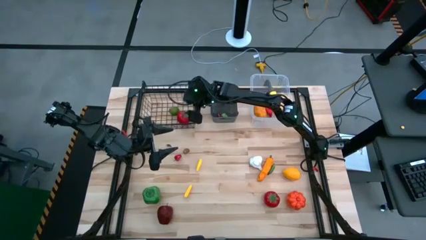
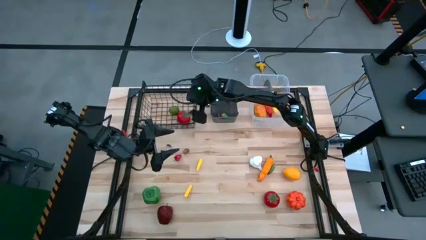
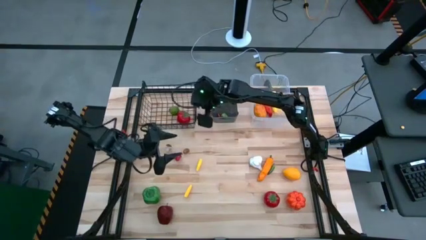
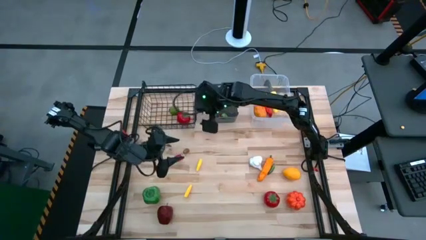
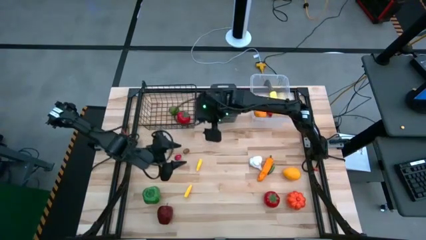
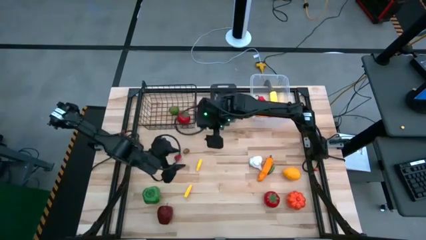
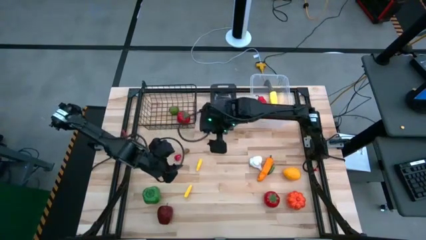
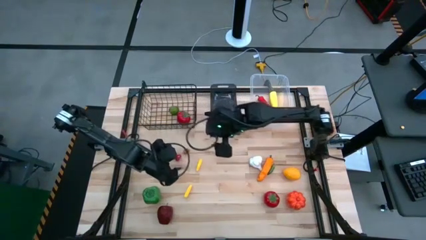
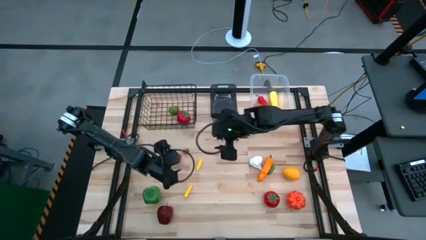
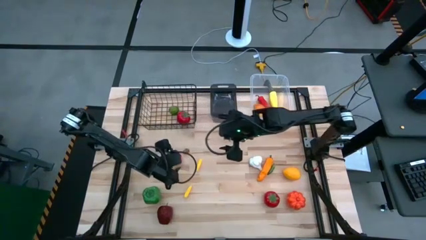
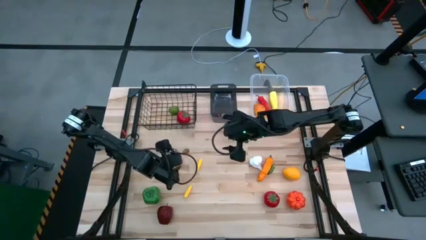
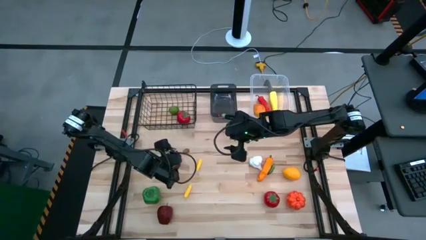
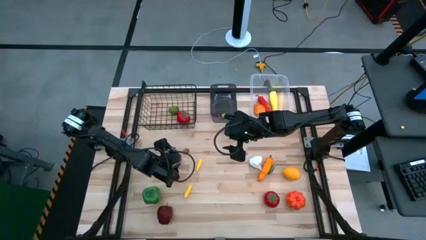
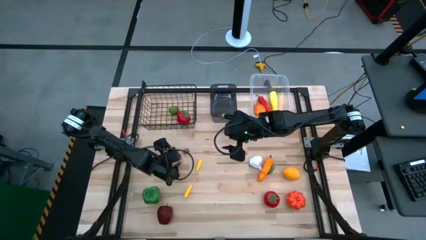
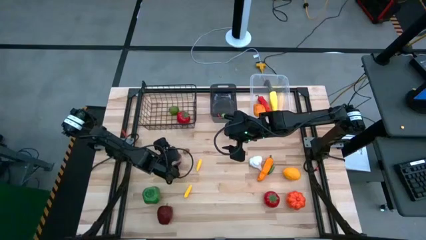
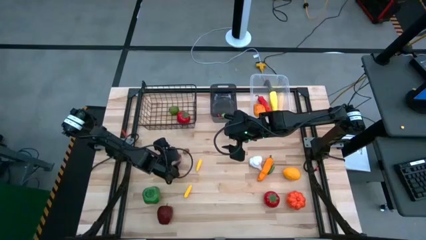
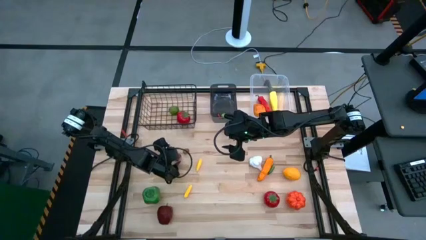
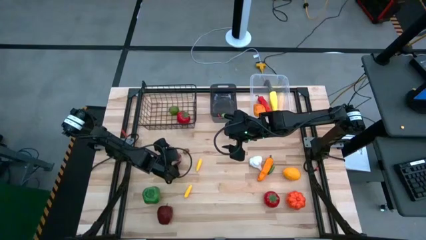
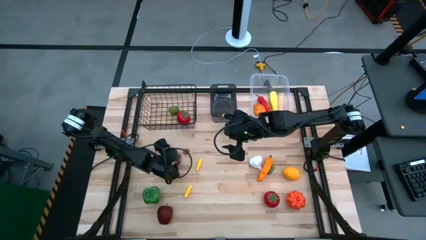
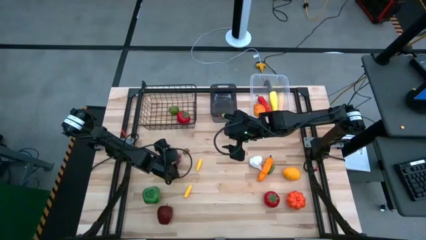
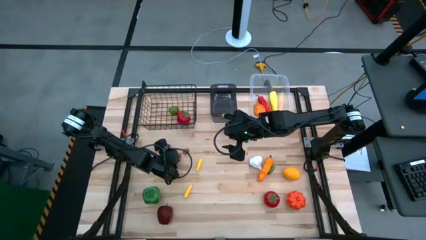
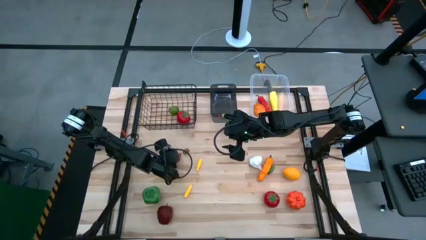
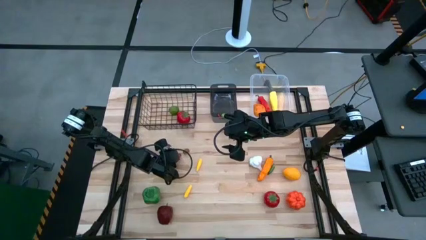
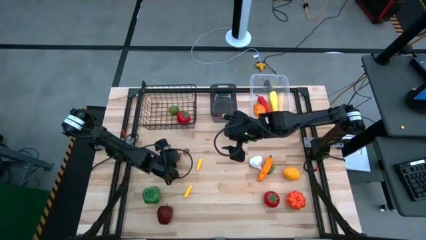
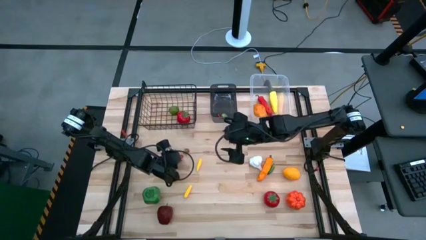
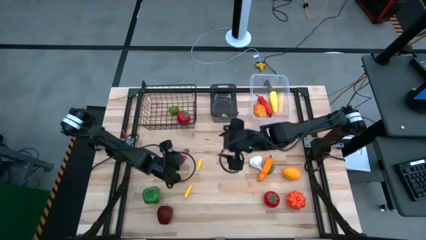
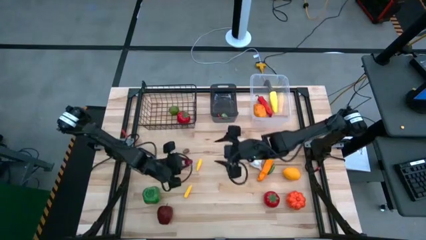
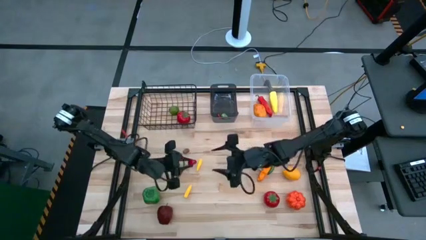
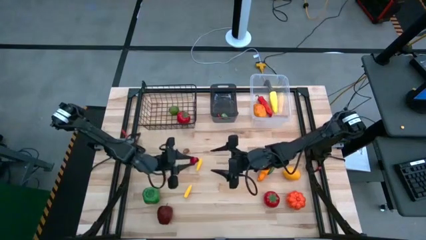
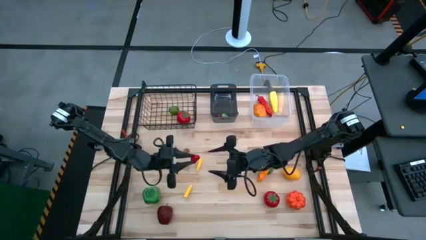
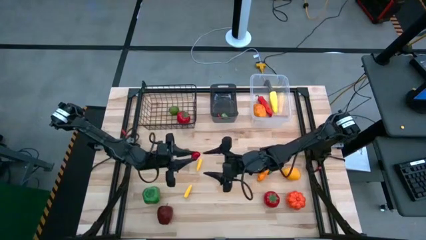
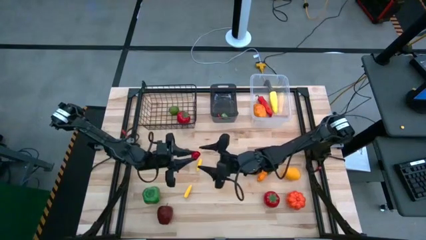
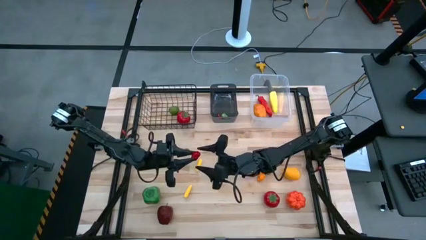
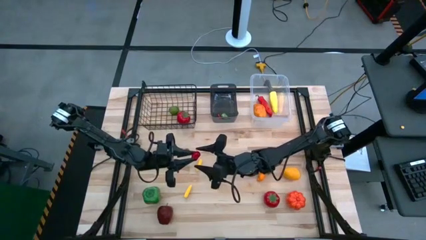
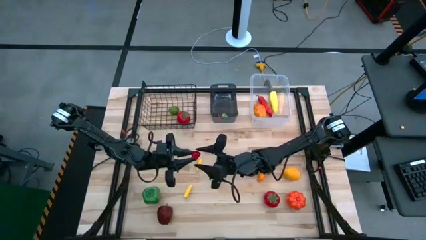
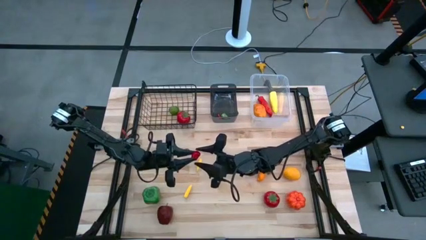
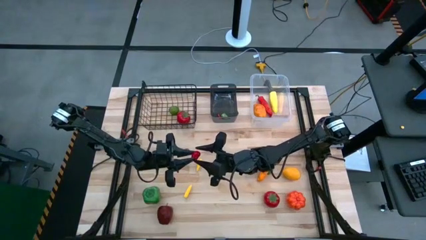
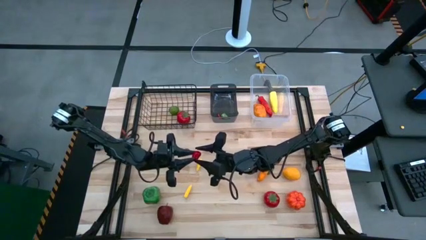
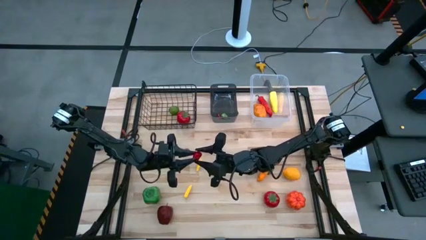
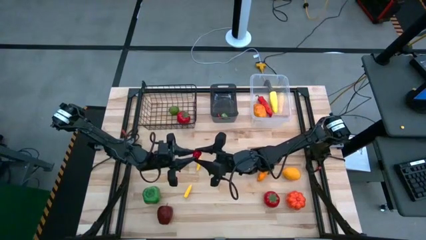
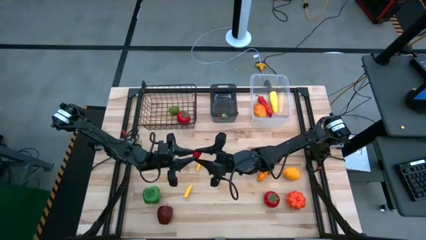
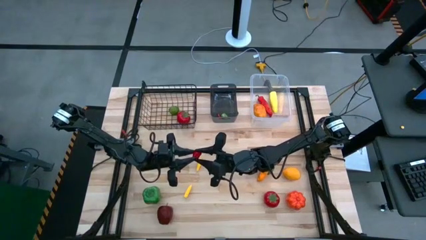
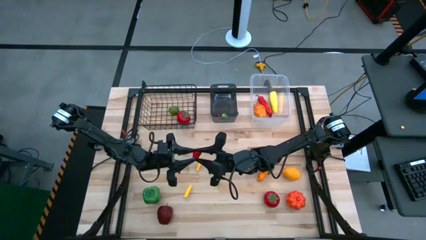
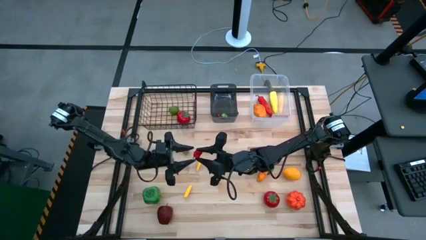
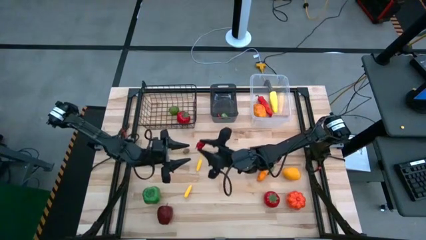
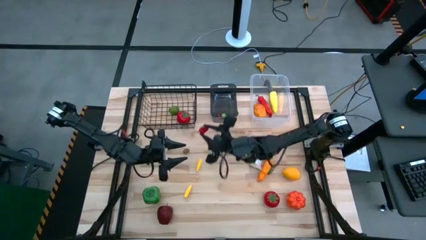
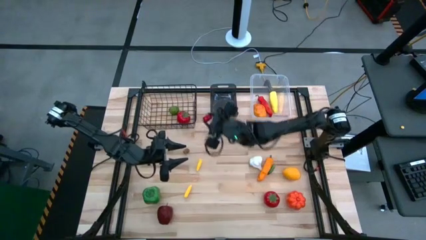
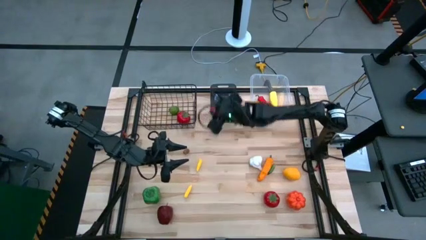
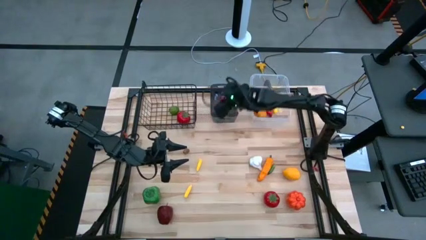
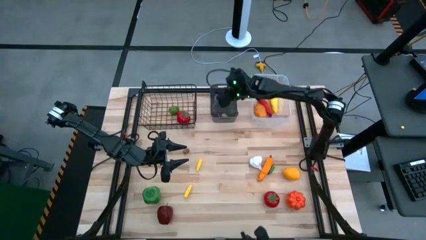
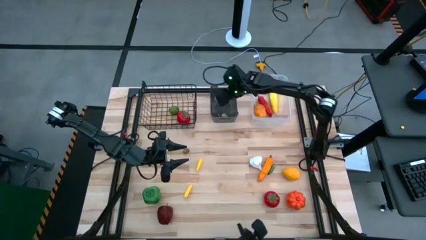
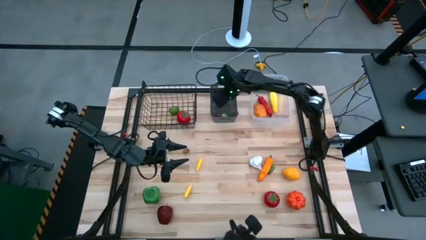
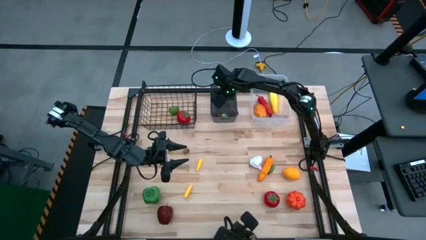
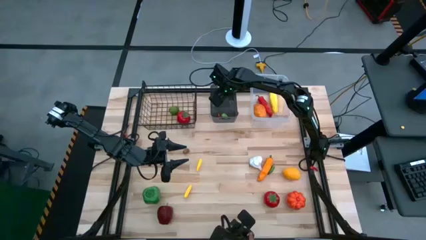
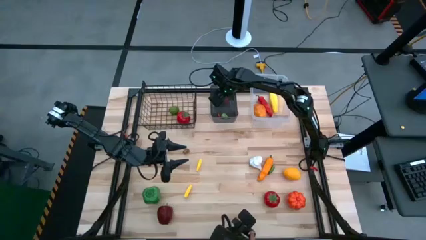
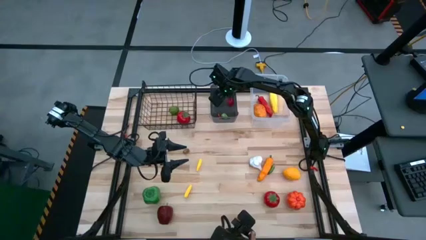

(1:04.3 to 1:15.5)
Task: Sort produce into baskets
Put the red bell pepper into the black bin

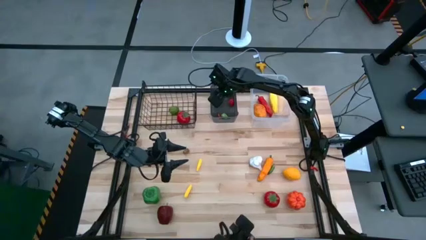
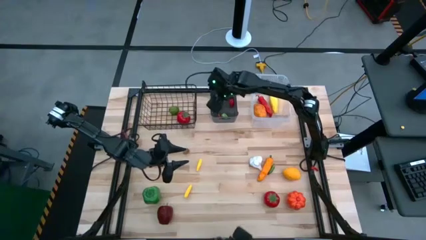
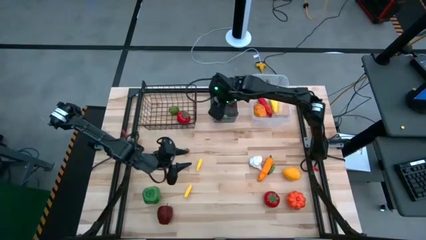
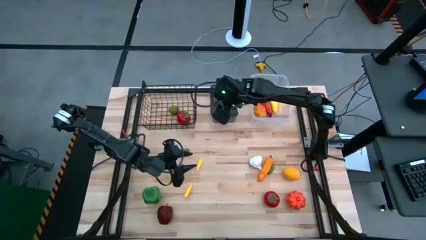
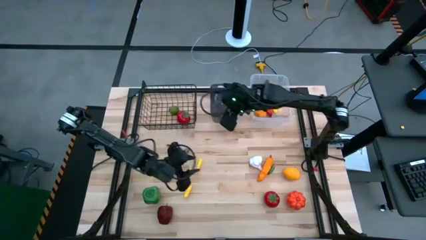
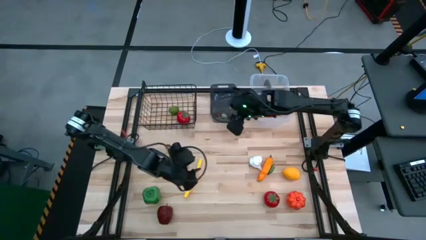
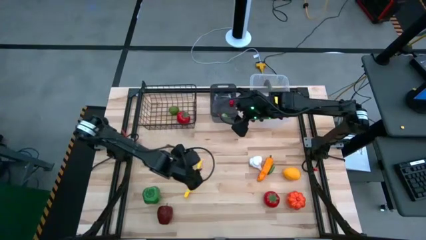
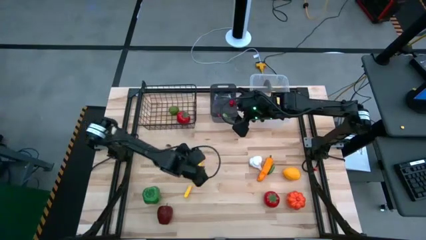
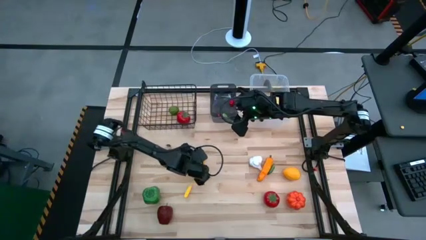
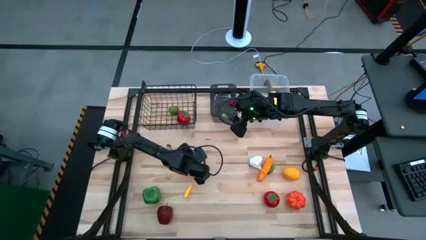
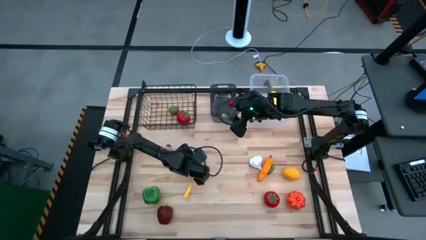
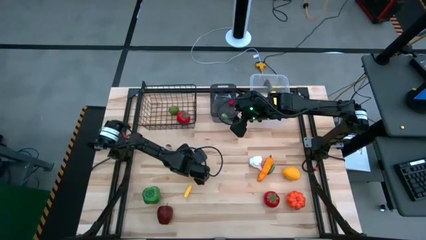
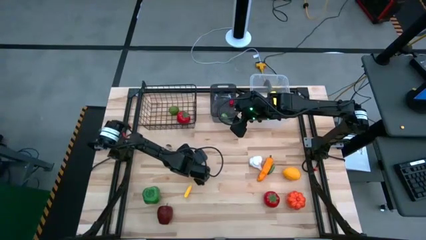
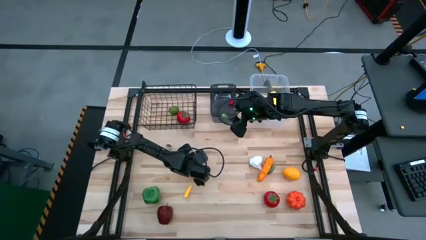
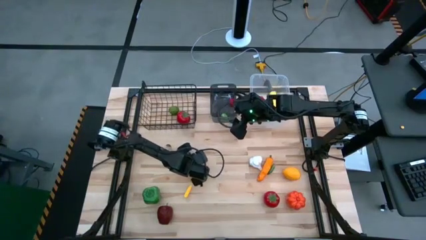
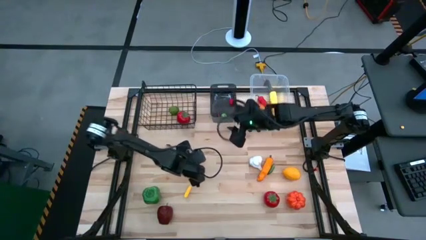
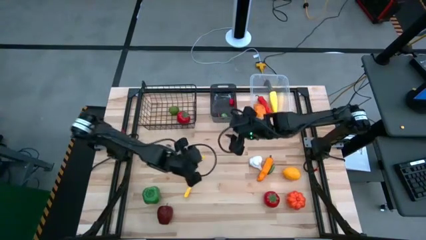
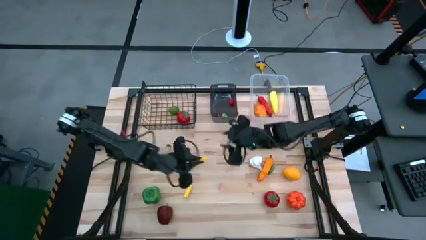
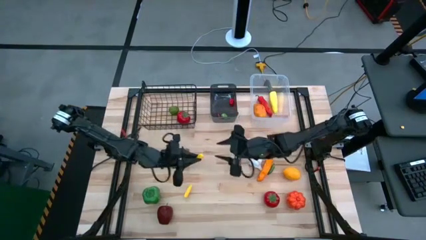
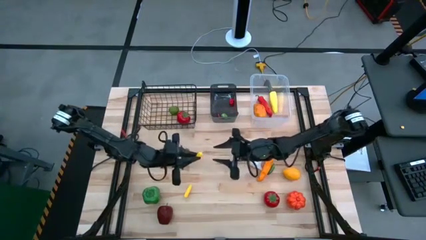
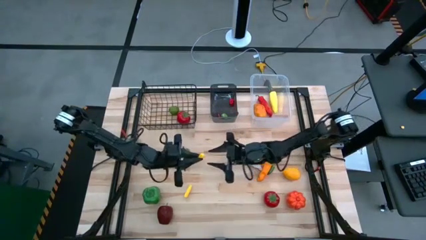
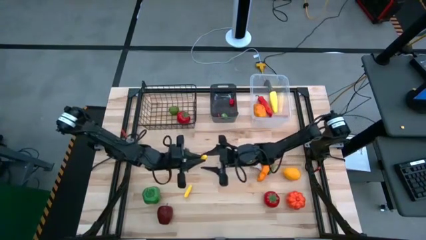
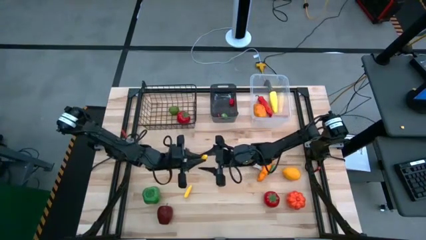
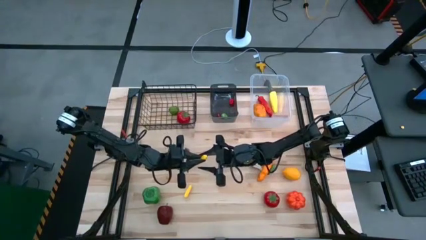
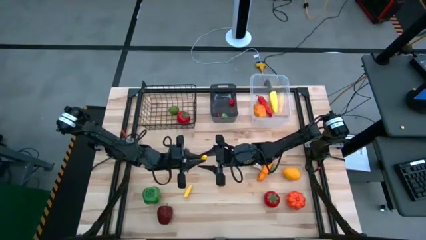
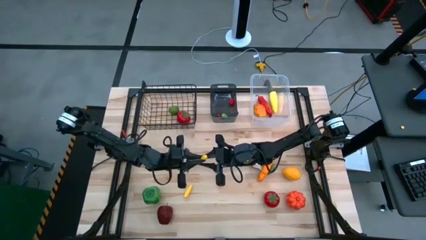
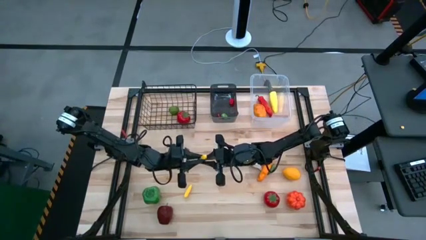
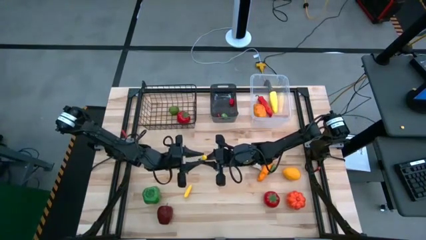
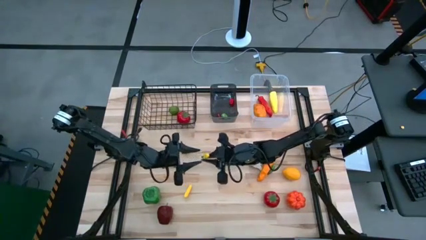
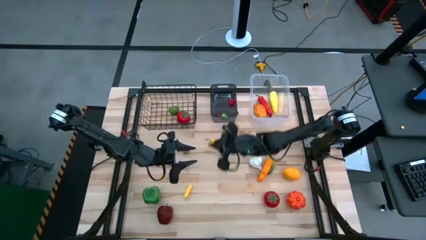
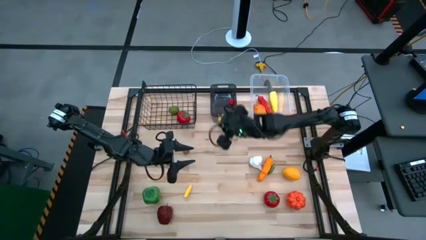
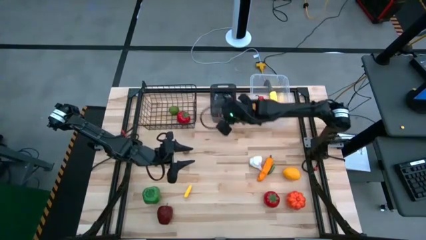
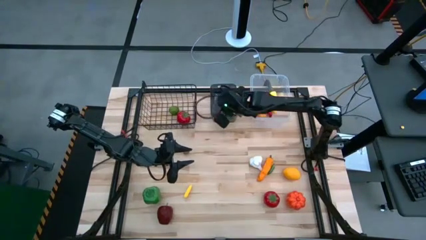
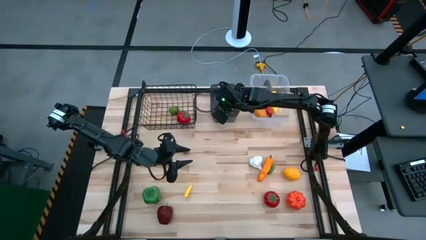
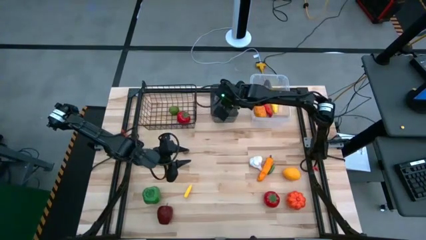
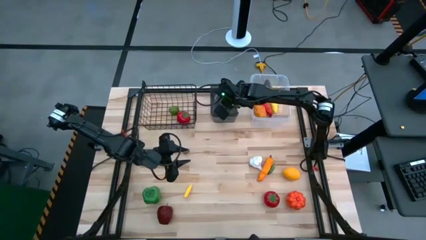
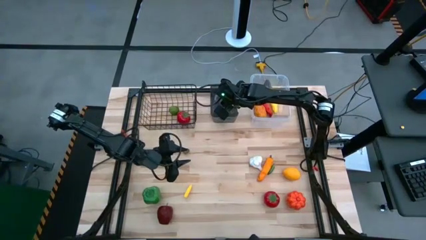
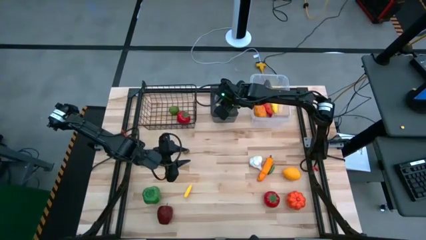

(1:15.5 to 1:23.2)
Put the top yellow chili pepper into the black bin
